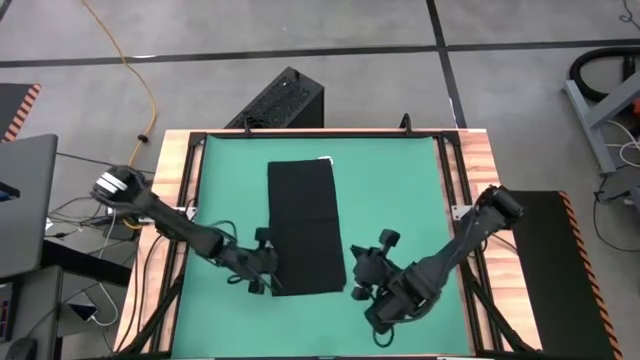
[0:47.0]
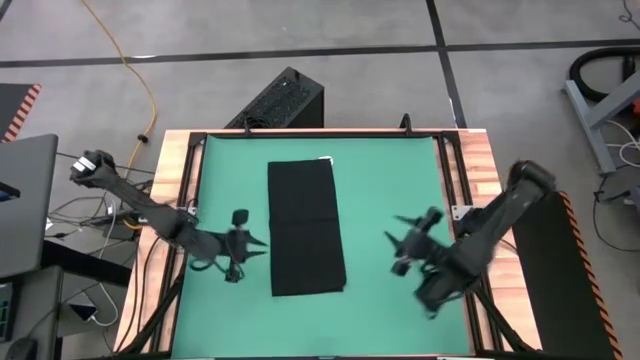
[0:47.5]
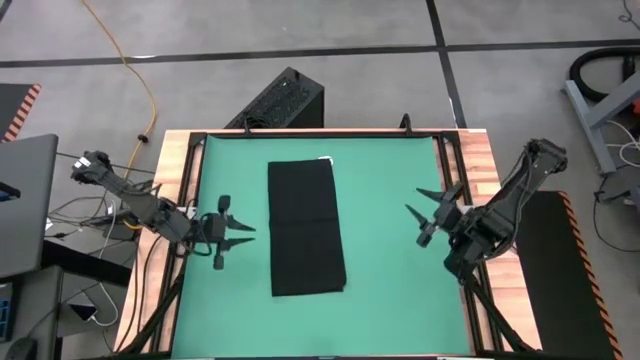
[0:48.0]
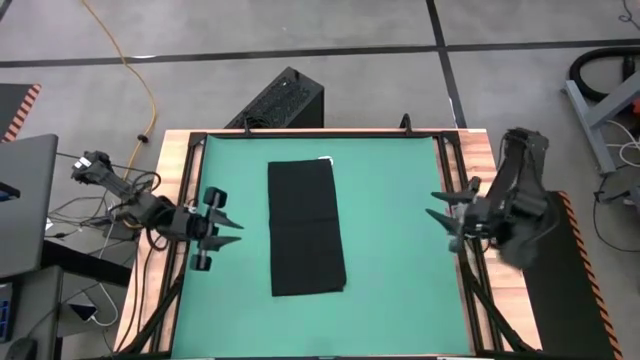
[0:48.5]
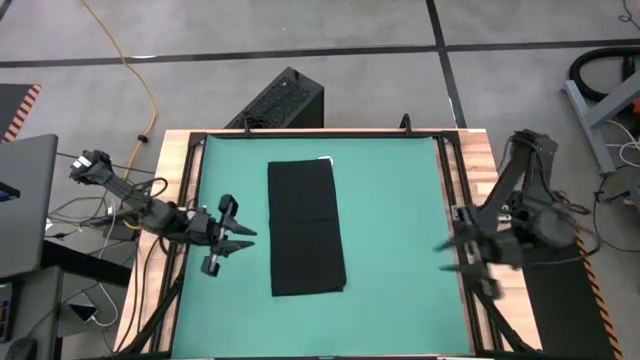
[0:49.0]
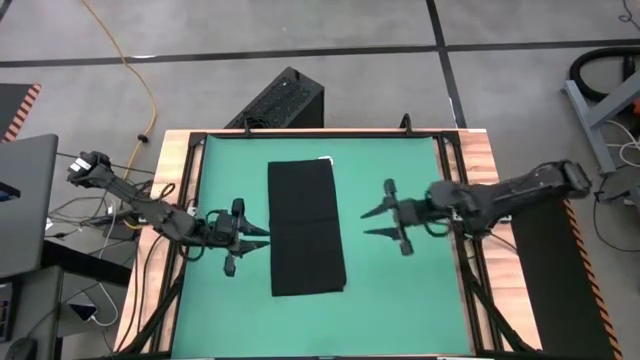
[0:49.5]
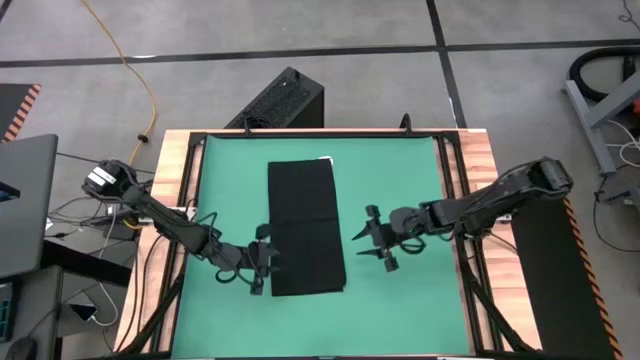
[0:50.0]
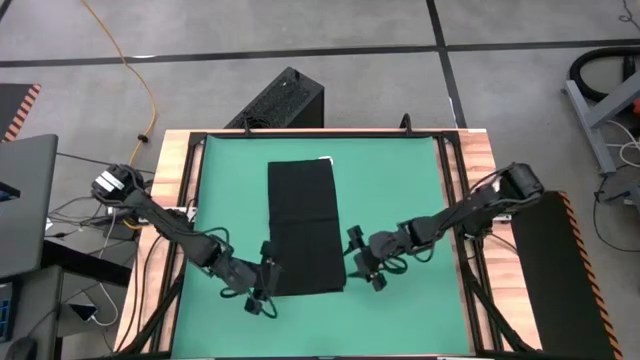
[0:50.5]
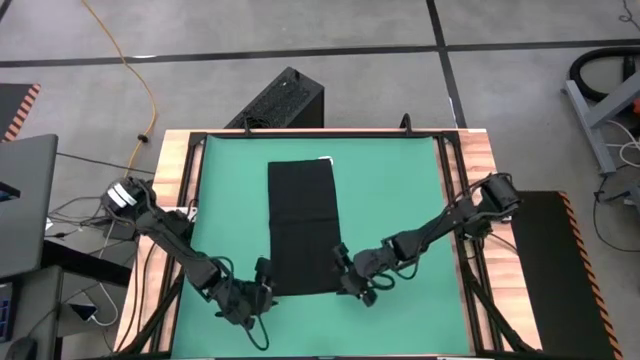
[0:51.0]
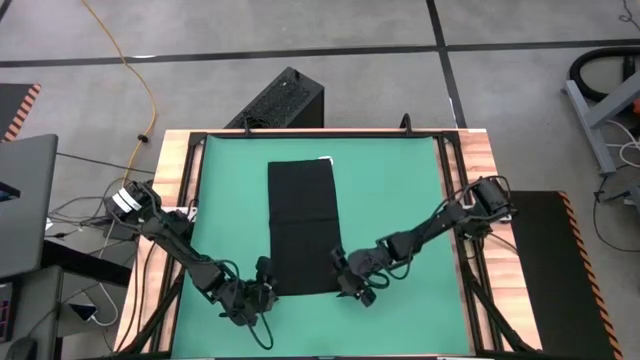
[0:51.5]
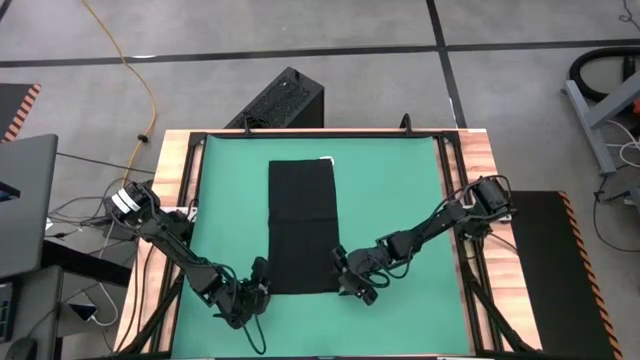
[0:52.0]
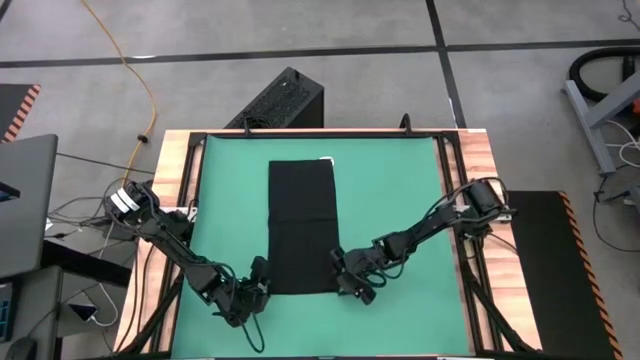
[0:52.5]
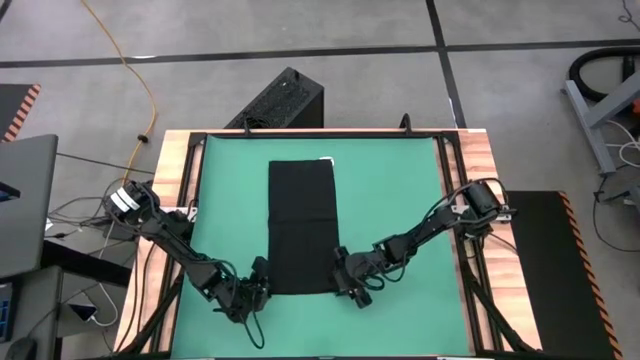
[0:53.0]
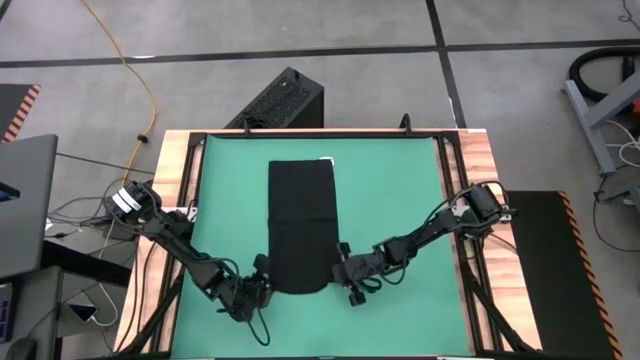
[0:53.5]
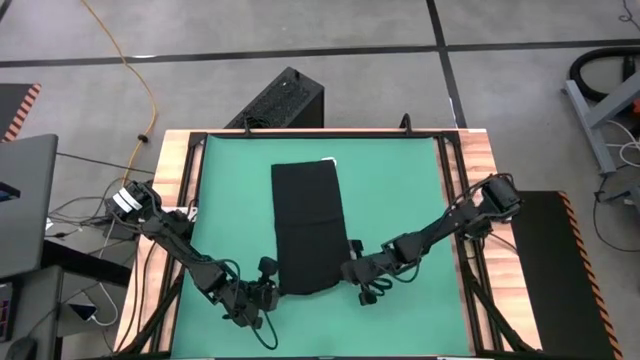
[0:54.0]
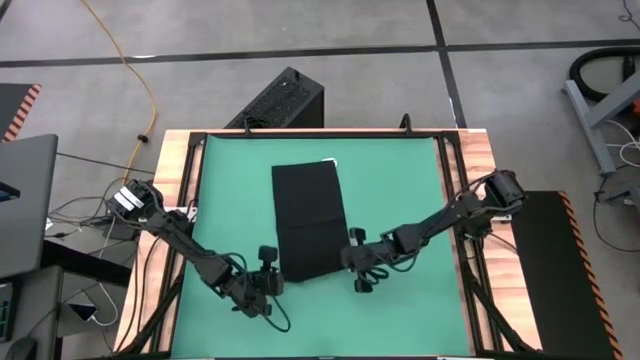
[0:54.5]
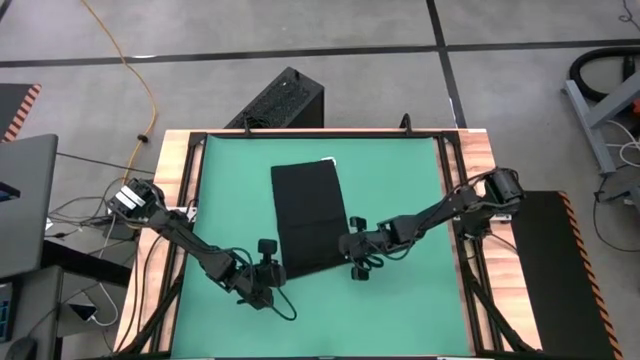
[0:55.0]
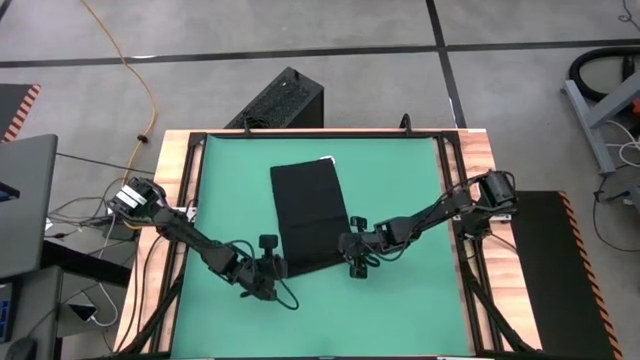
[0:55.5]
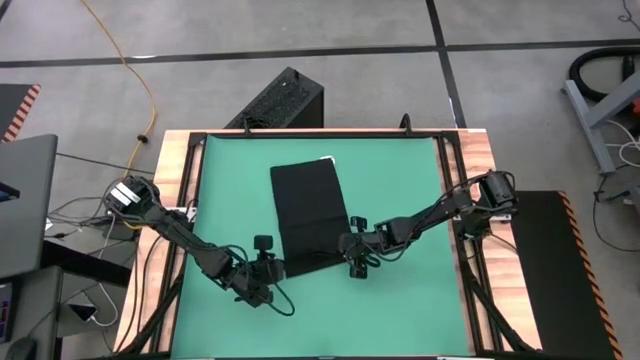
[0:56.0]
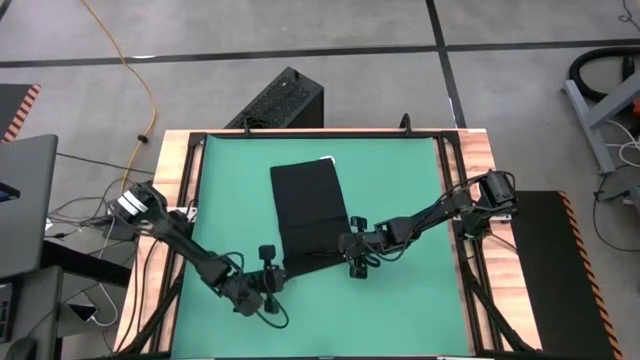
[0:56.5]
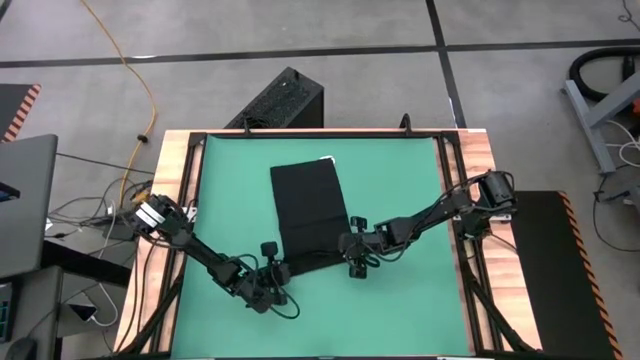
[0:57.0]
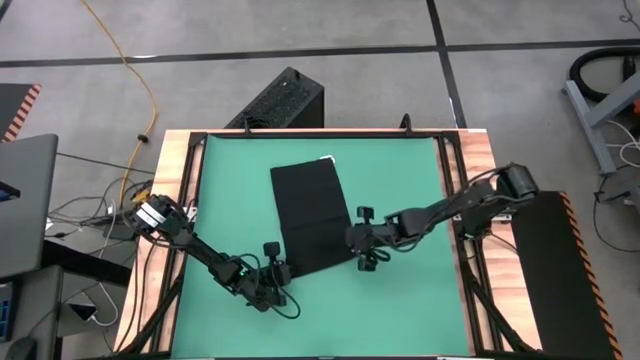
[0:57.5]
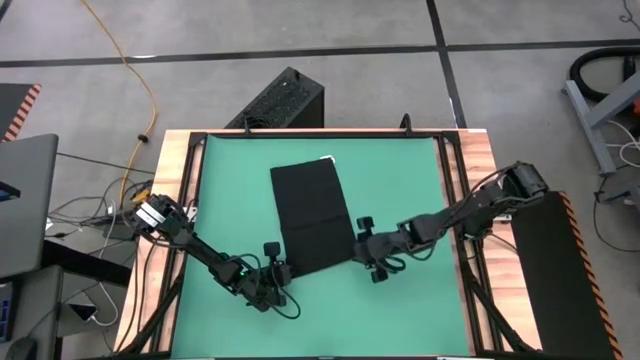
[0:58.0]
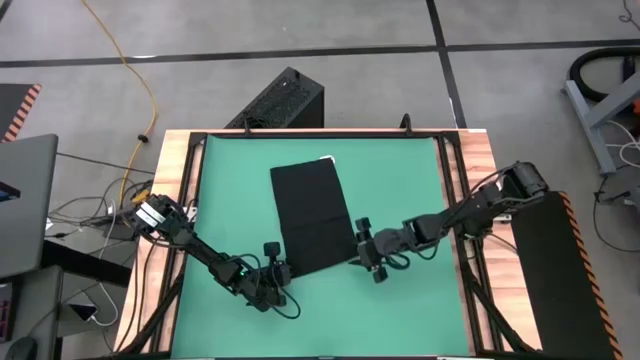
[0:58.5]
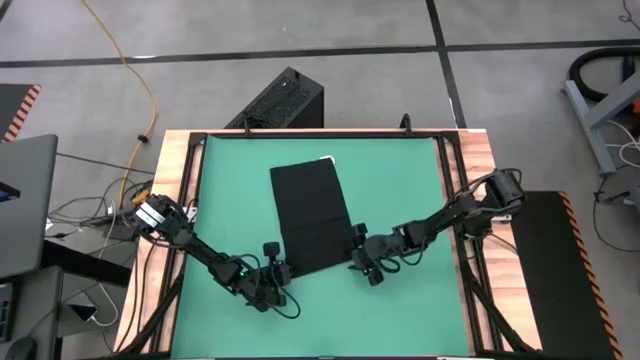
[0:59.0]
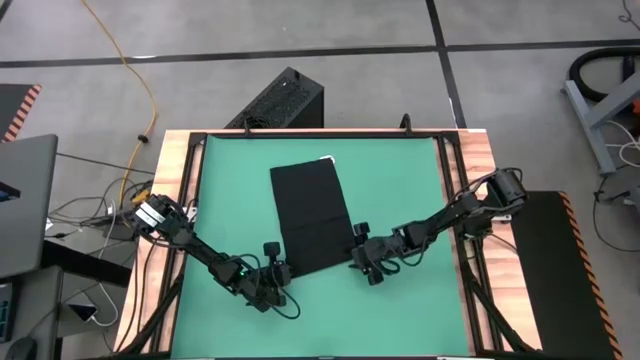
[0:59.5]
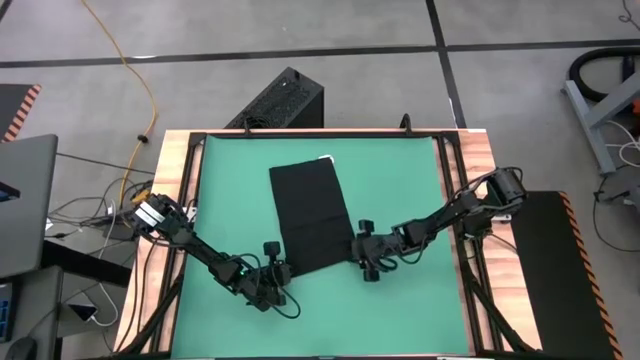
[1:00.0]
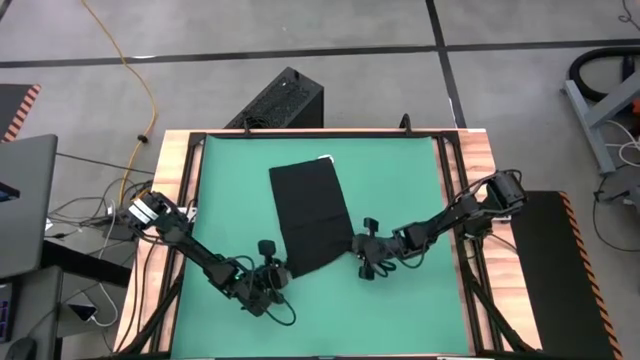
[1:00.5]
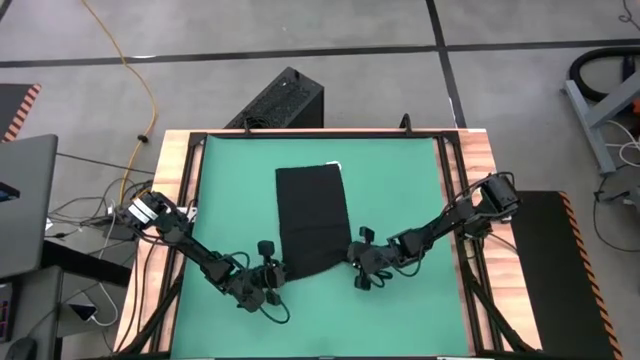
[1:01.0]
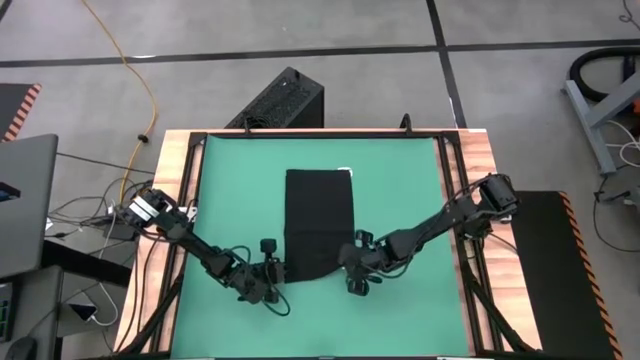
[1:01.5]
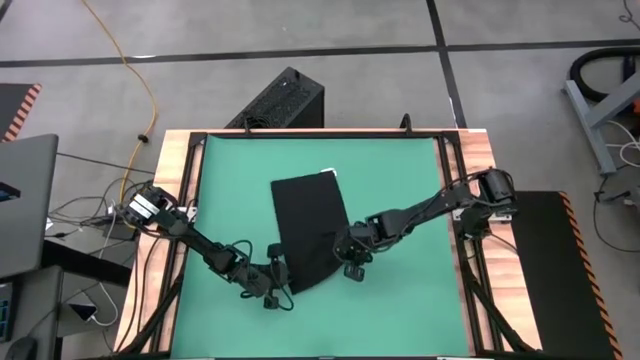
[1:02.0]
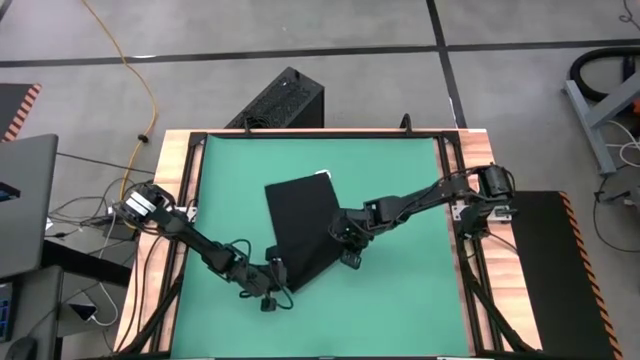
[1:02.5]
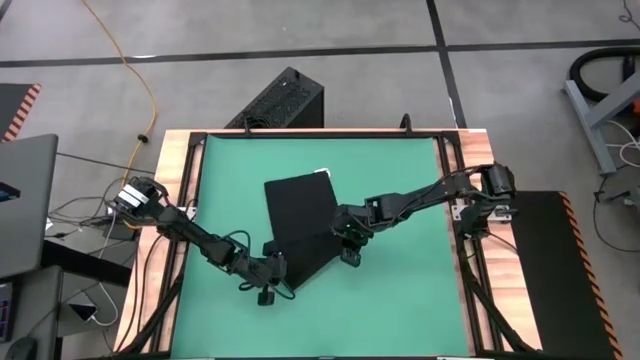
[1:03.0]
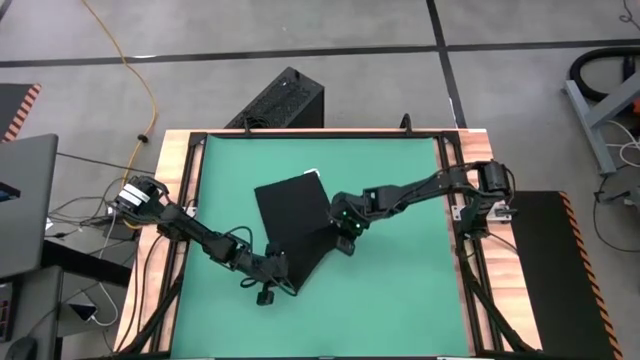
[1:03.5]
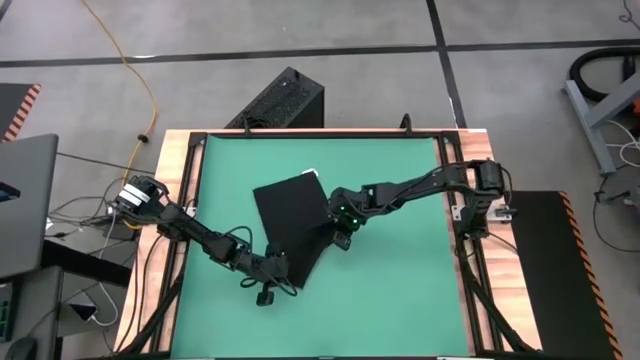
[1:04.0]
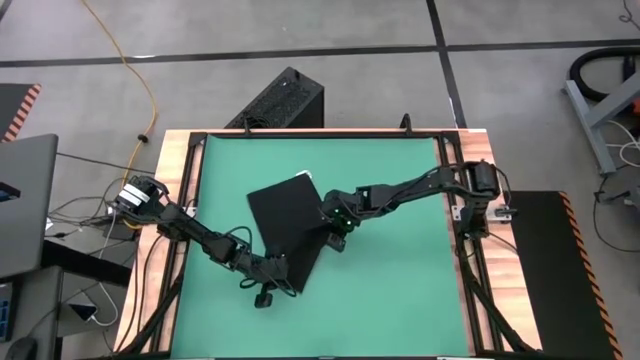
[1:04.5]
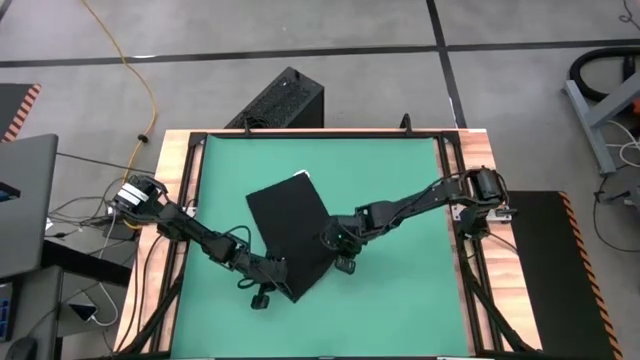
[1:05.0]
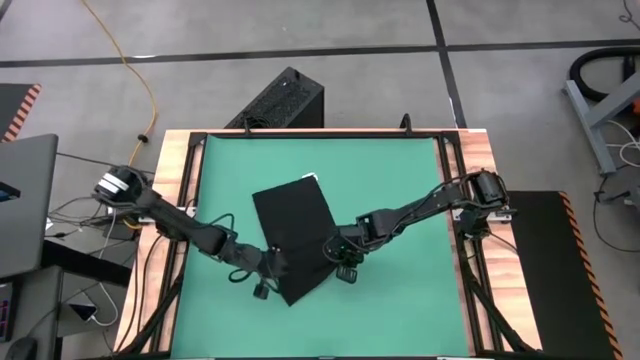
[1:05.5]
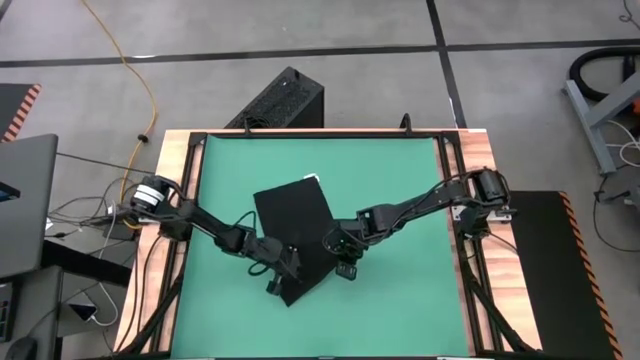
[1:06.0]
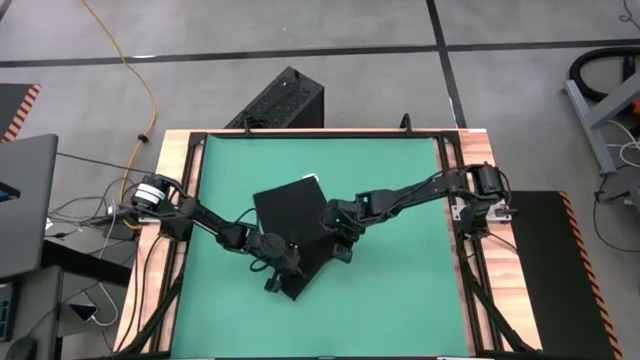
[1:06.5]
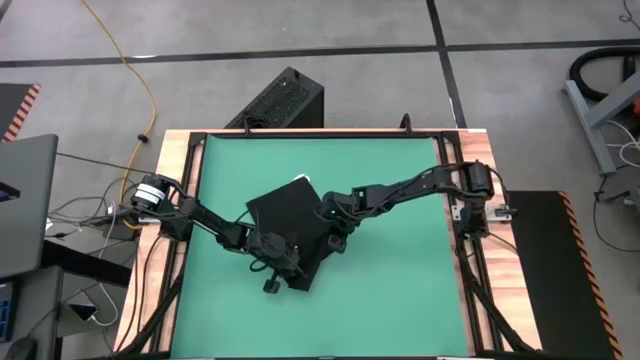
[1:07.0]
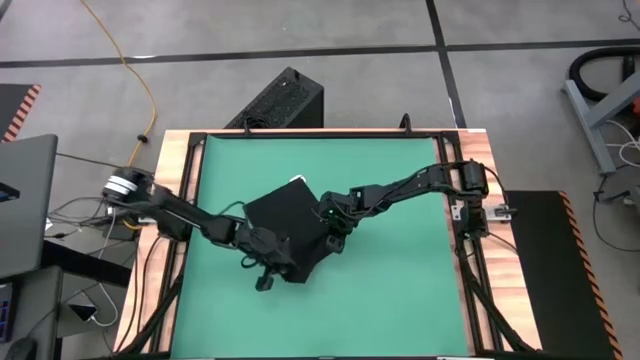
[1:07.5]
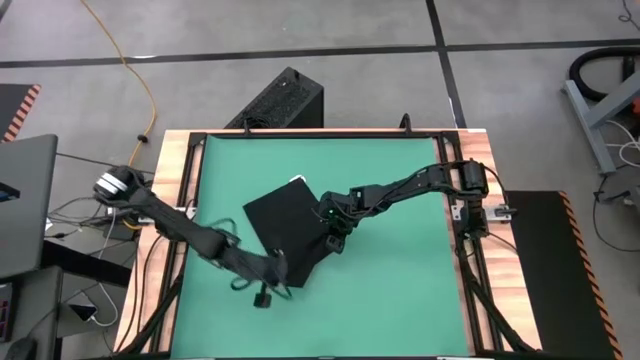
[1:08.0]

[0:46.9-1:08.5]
Task: Roll towel into tight, uniform cylinder
Roll the black towel
